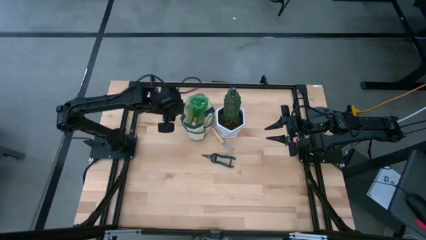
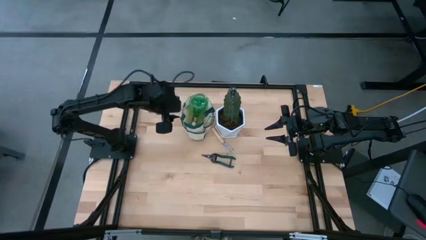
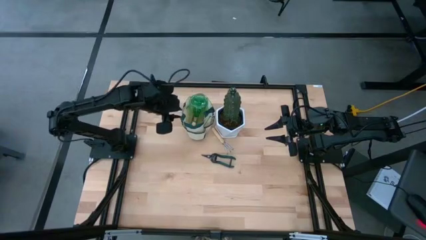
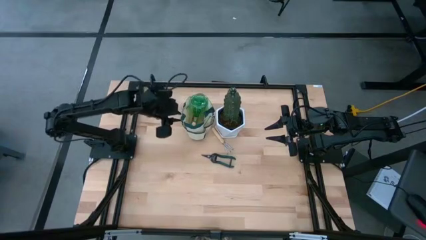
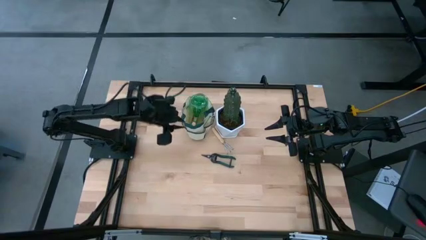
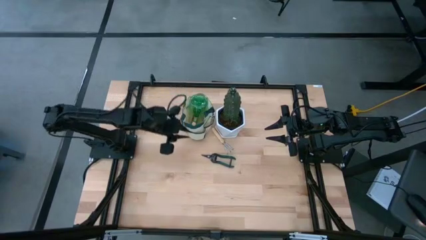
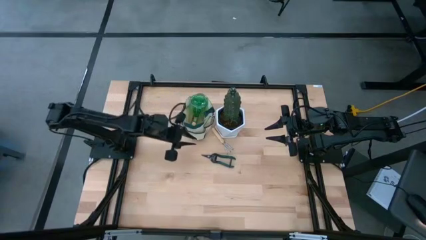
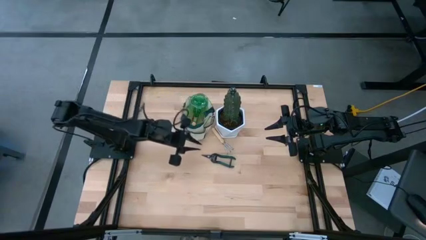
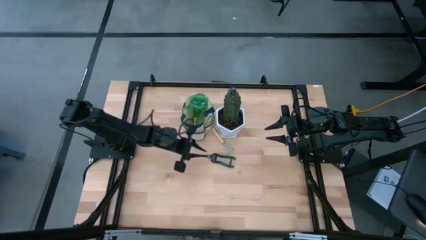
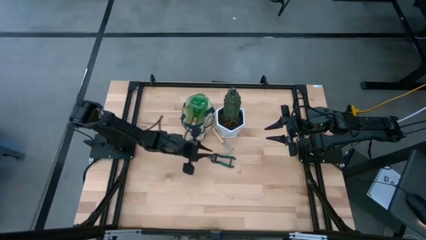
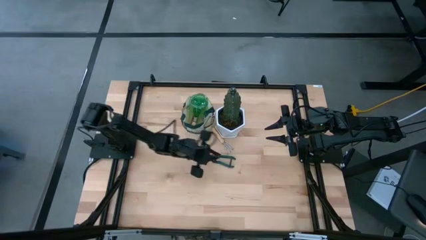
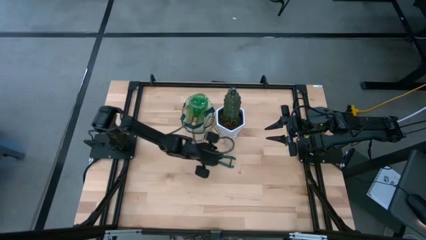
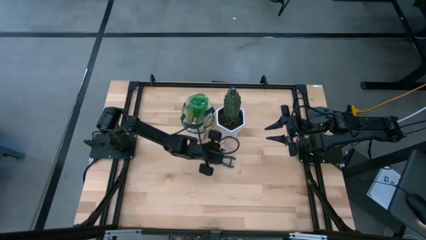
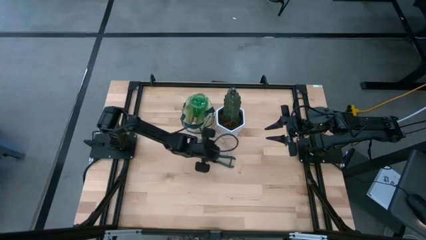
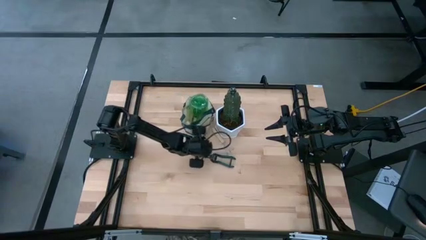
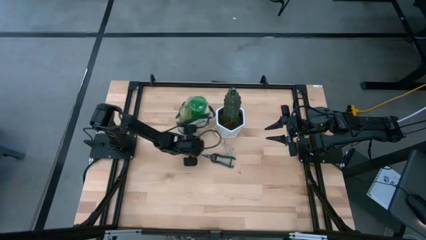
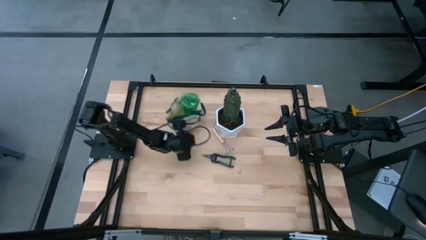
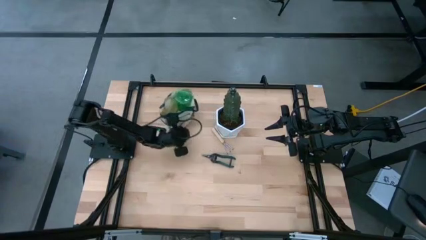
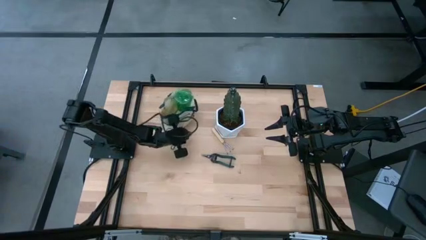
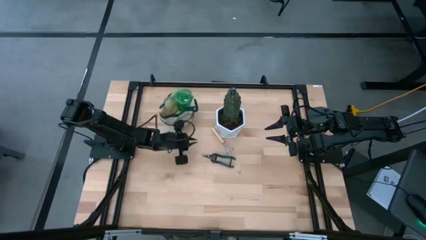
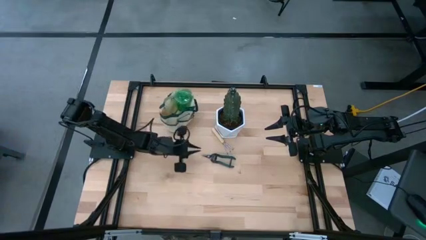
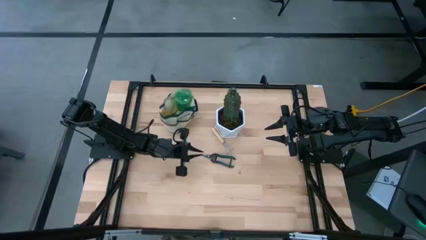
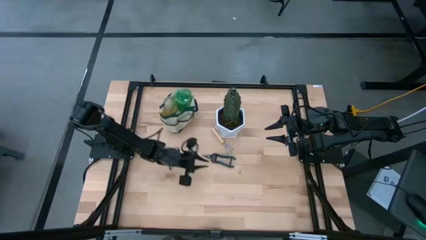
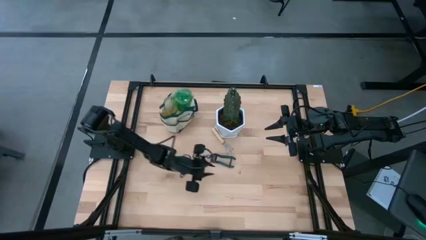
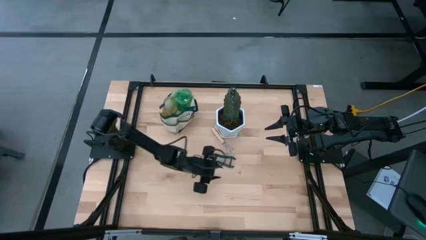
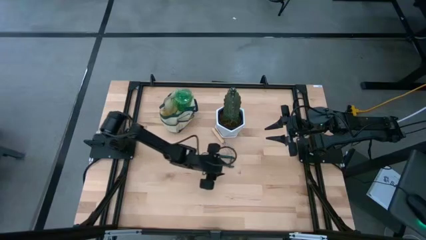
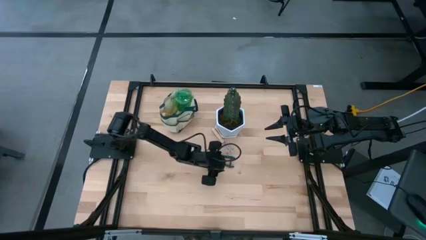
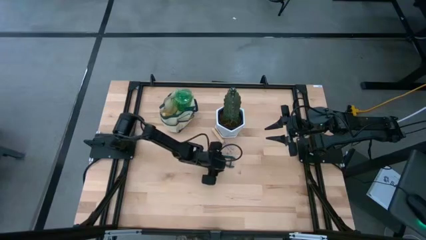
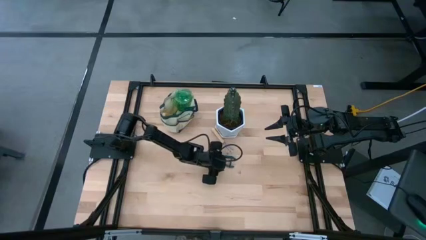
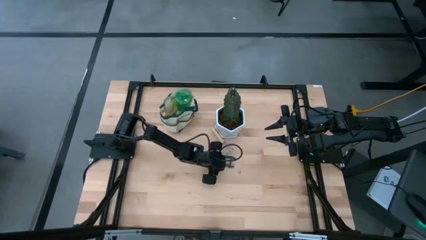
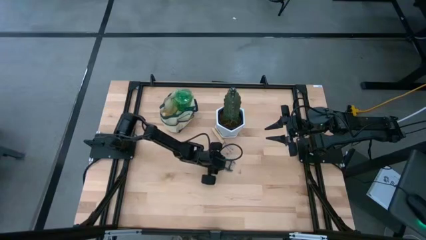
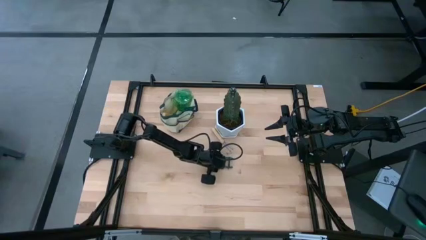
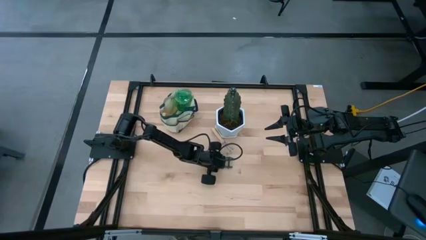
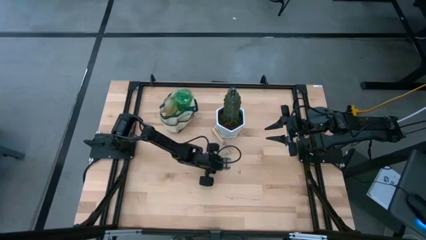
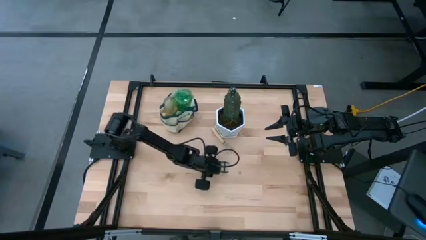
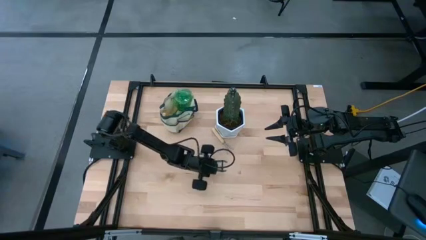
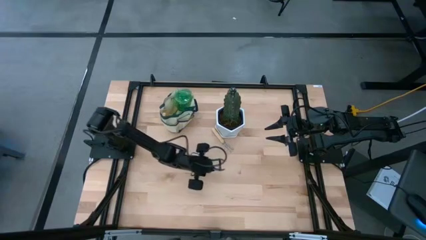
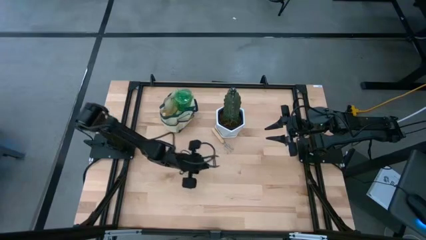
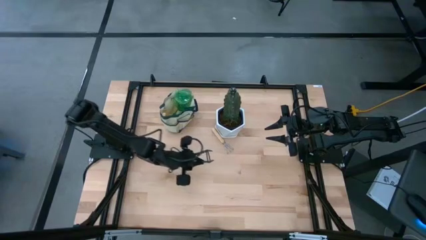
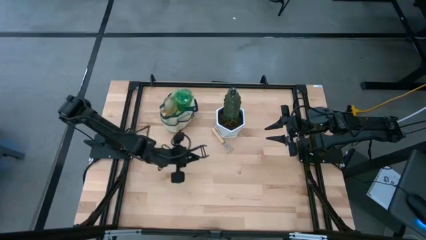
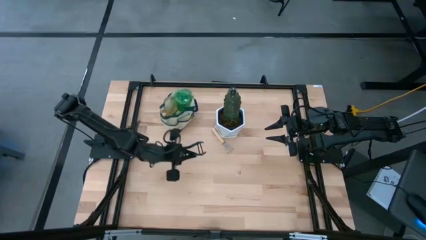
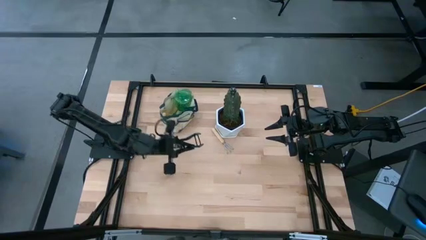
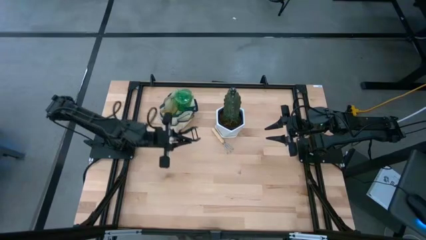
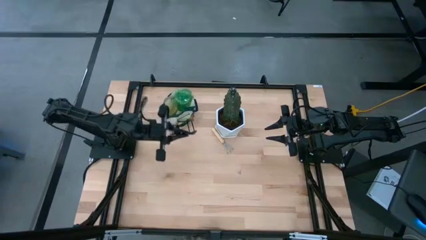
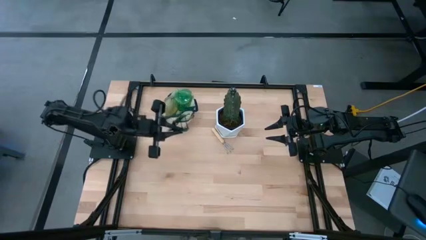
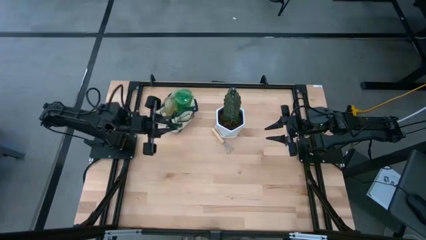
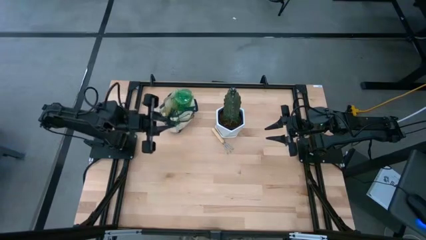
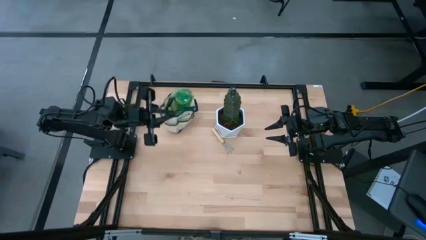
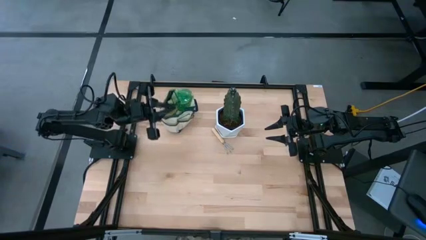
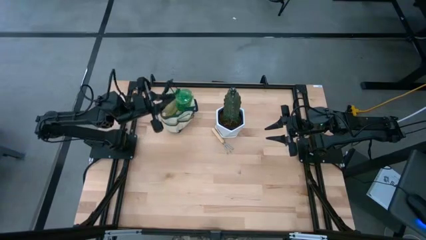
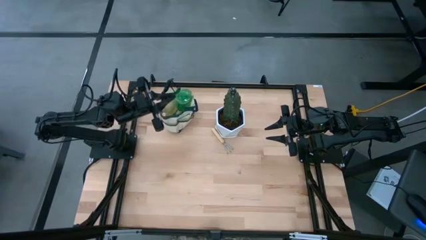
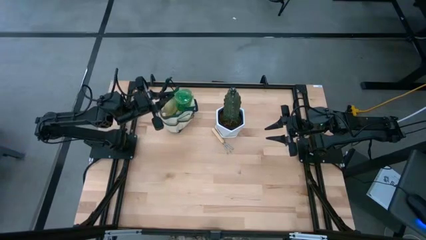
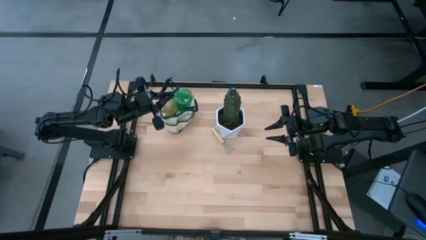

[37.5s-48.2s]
Task: Pick & Place Garden tools in Gardening bag
Put the green shear scissors into the brown gardening bag
